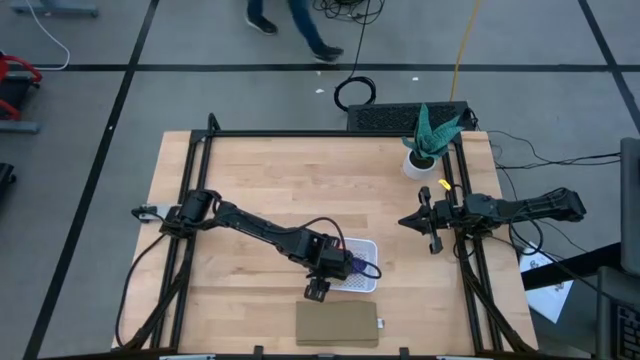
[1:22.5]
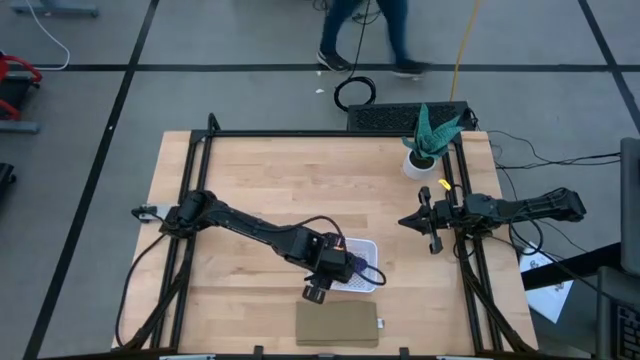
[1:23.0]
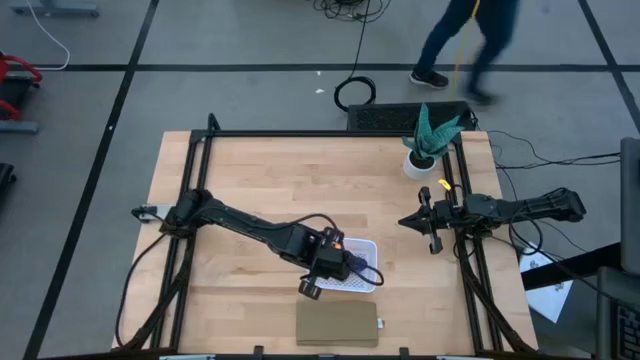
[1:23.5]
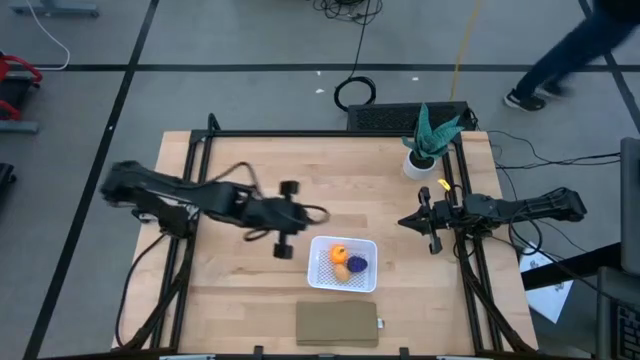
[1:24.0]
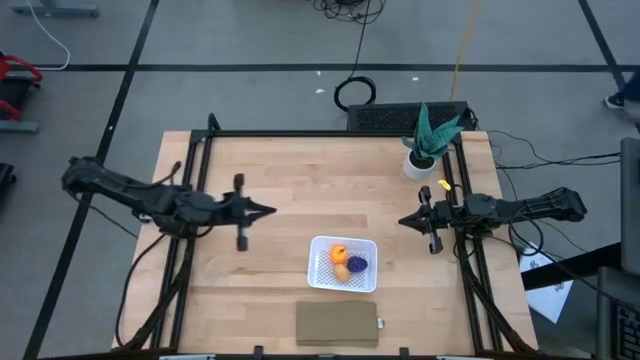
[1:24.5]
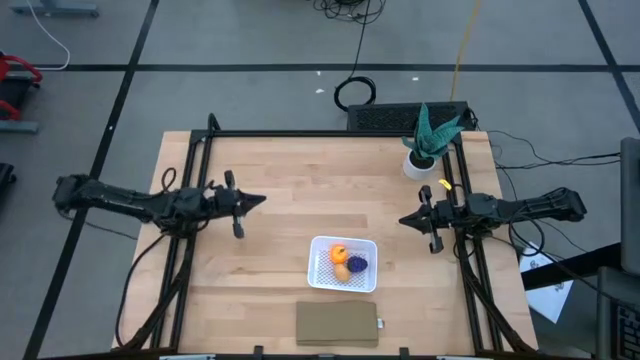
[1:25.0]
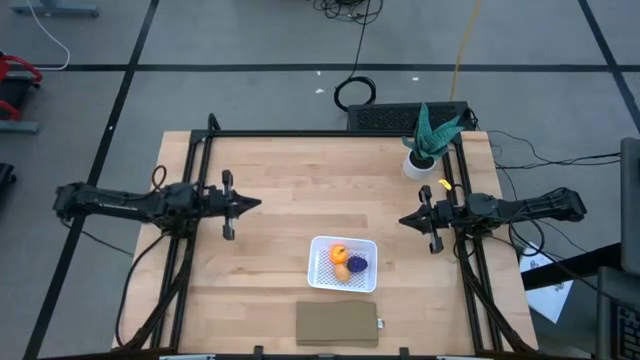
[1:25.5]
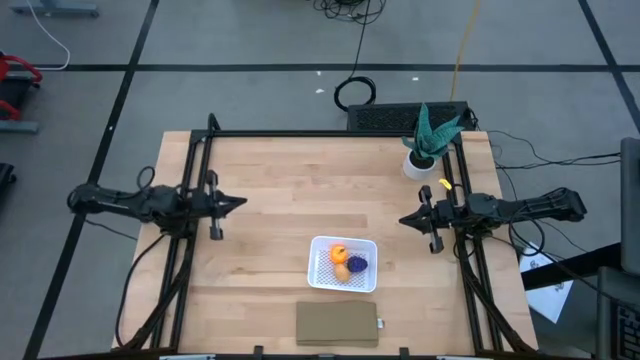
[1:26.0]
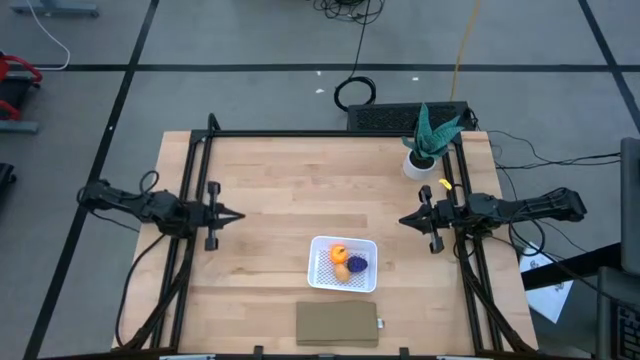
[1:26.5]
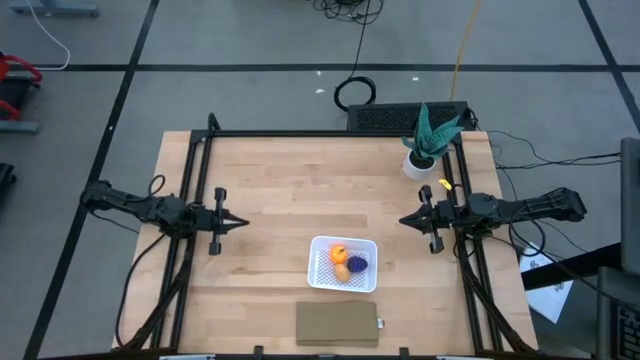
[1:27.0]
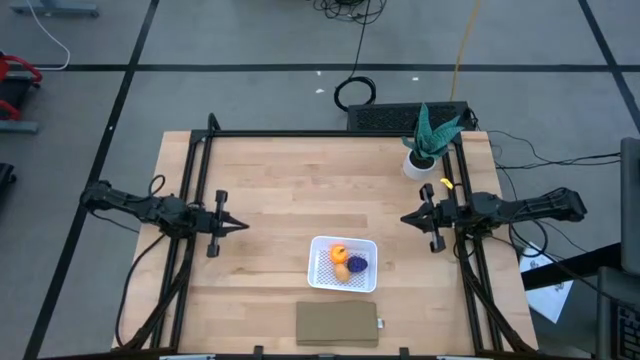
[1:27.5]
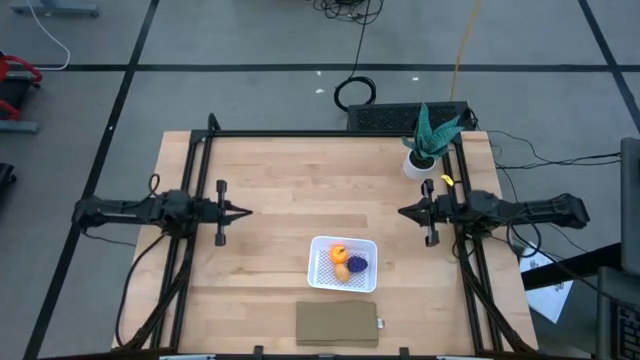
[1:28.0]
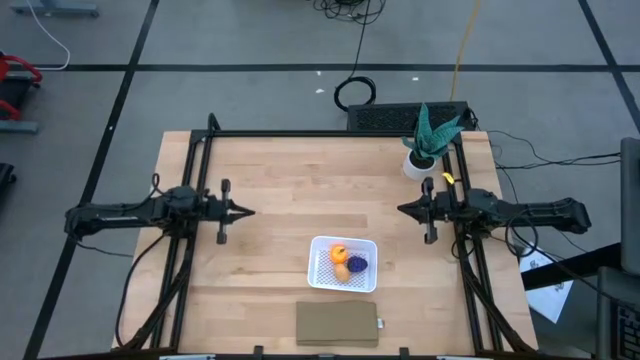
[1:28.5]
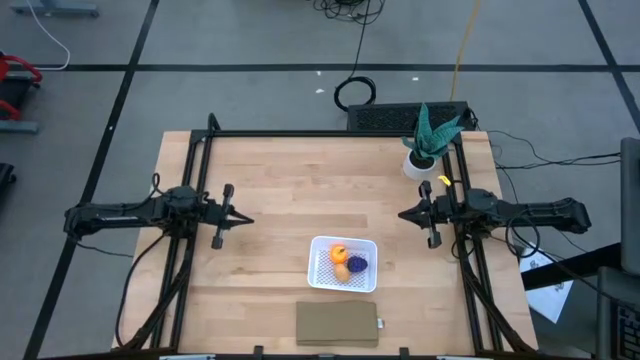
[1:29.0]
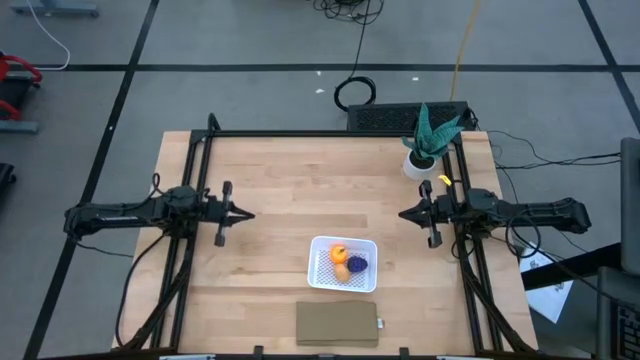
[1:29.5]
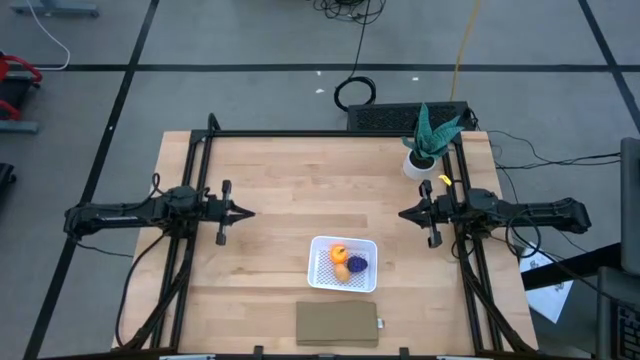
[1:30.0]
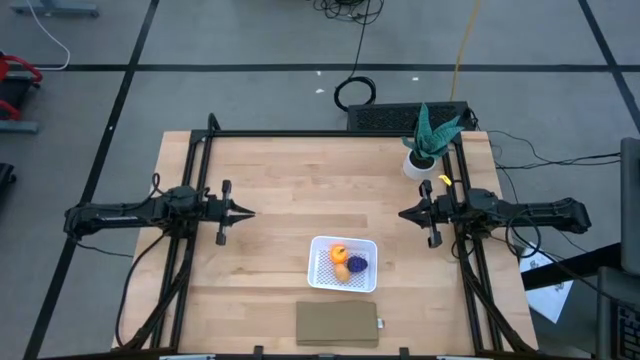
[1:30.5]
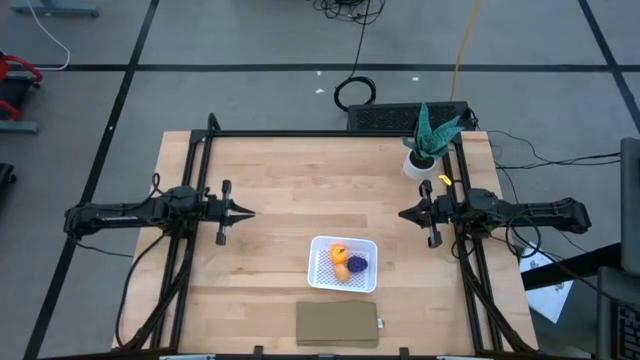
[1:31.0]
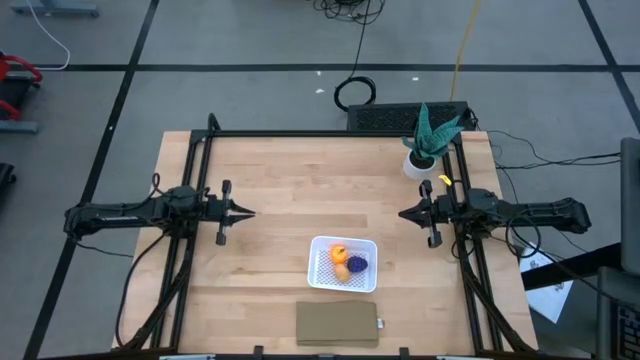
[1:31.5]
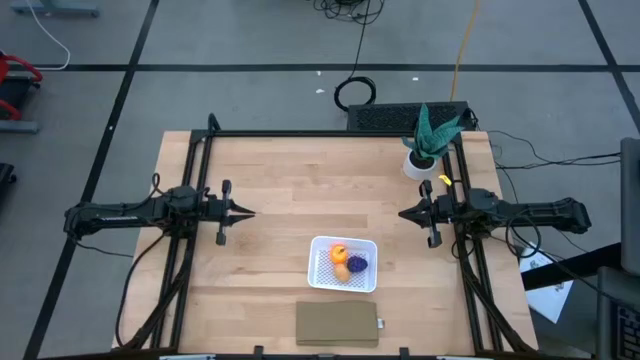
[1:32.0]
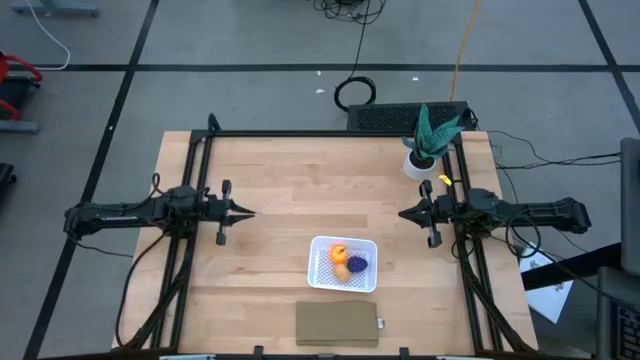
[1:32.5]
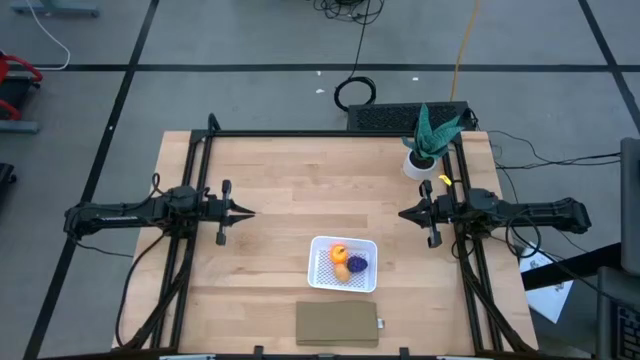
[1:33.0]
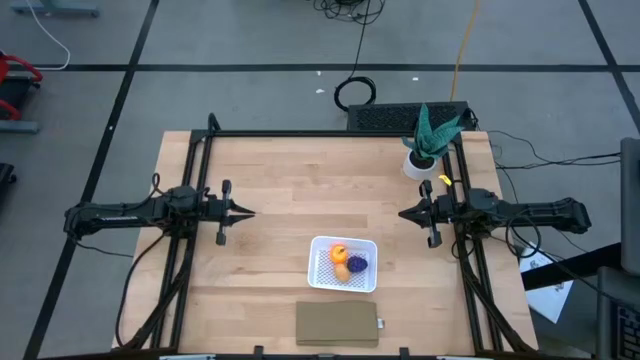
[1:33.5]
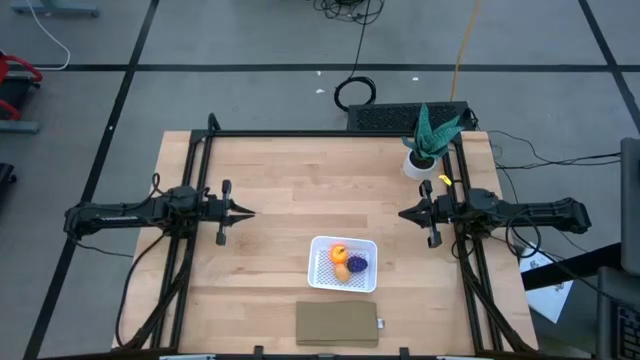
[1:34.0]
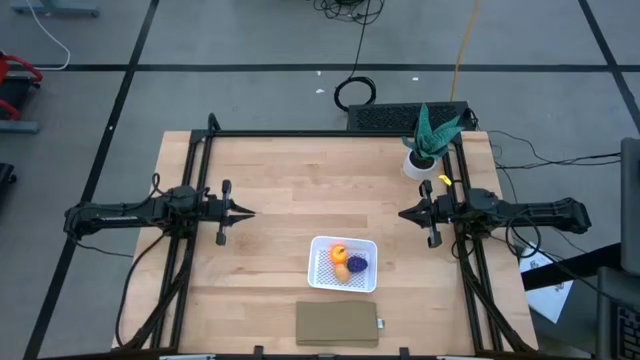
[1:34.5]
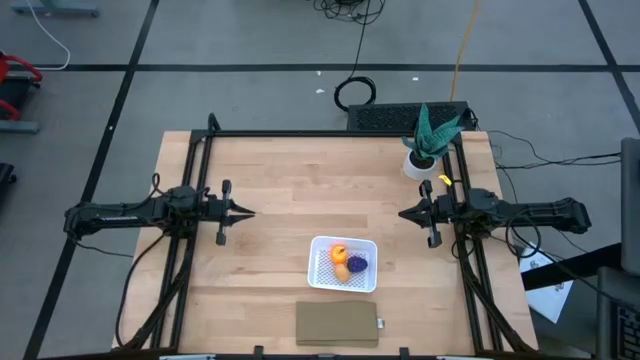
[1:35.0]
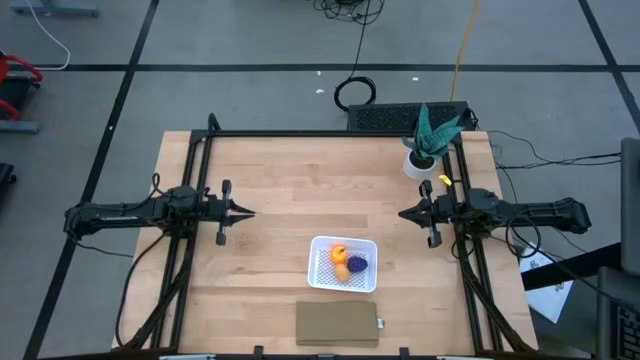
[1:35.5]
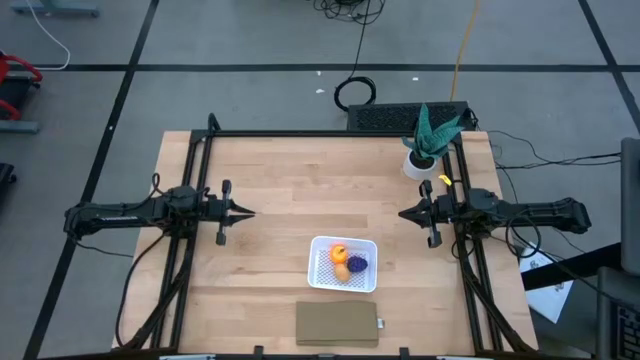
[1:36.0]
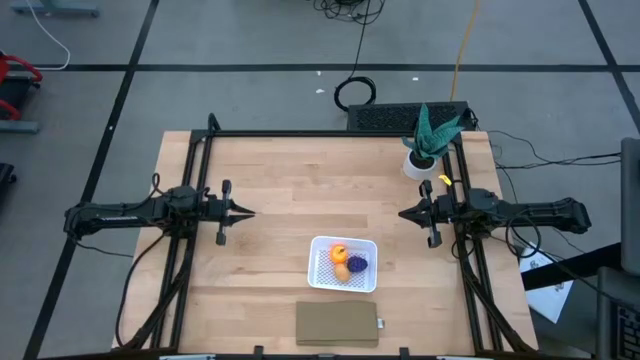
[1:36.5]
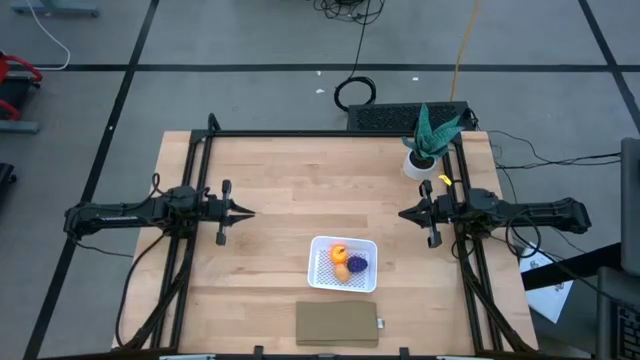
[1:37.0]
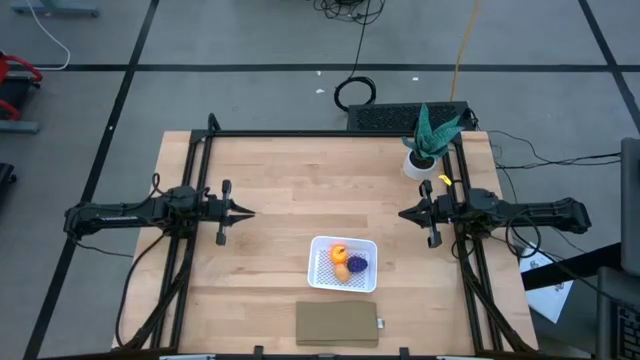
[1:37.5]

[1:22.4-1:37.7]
Task: Pick and placing Produce into tupperware
Return to Home Position

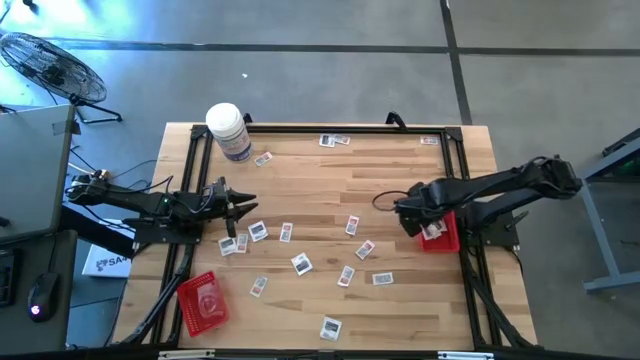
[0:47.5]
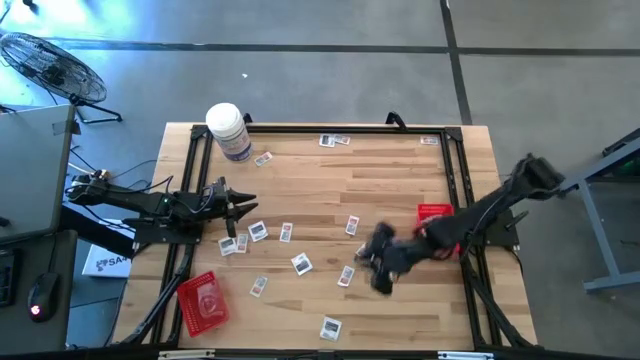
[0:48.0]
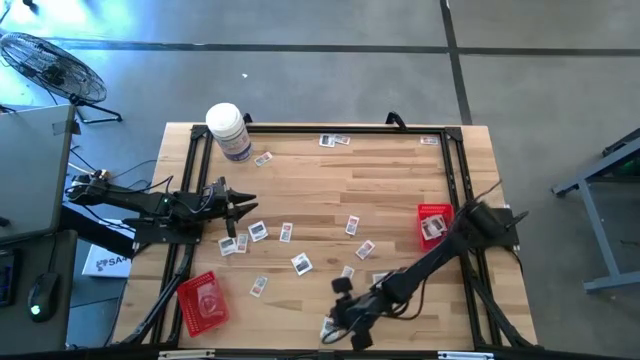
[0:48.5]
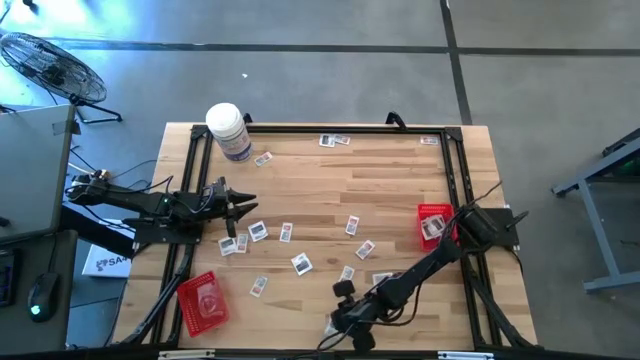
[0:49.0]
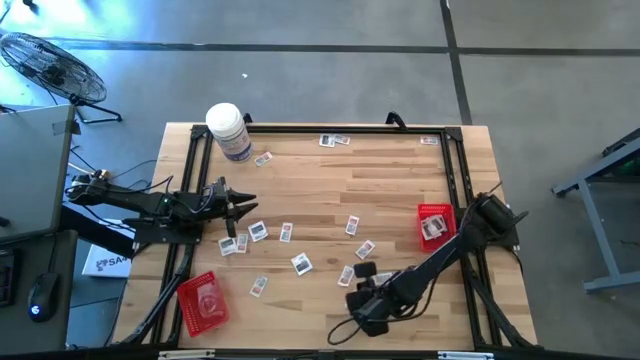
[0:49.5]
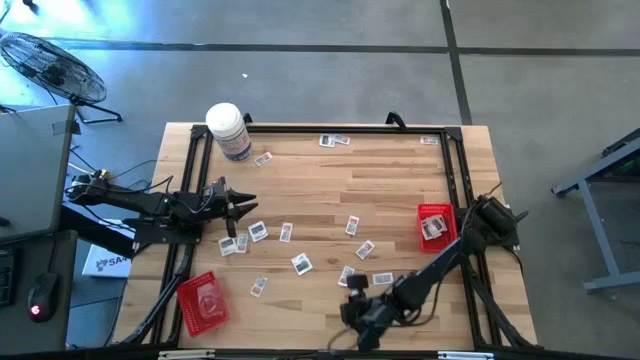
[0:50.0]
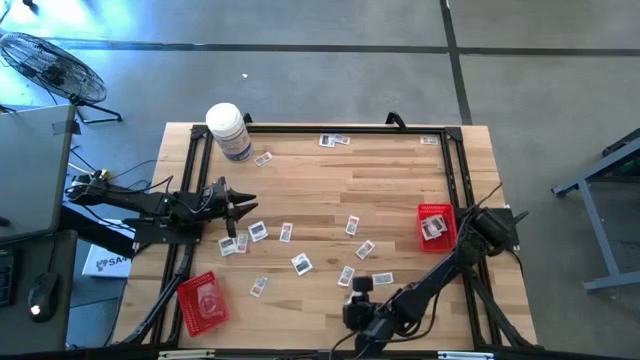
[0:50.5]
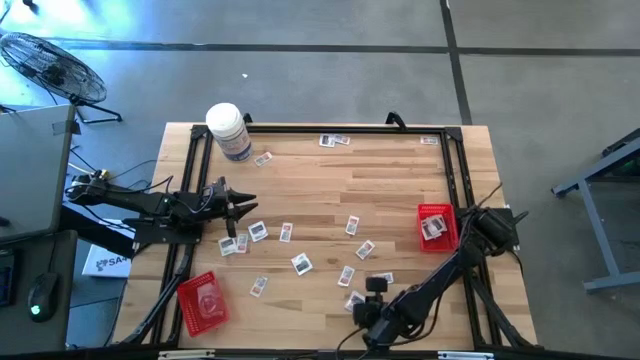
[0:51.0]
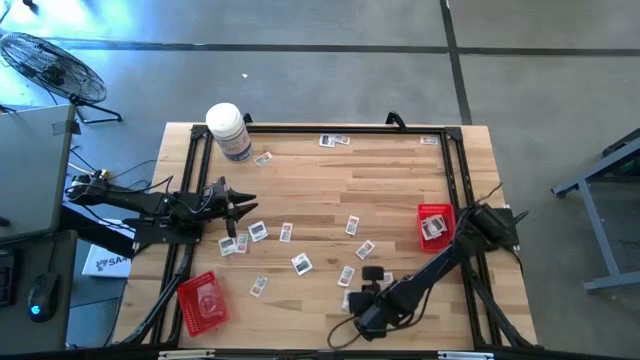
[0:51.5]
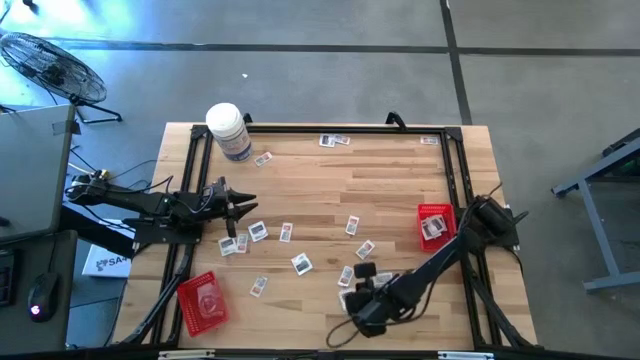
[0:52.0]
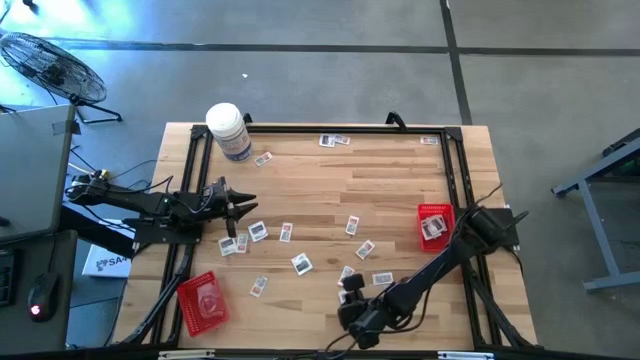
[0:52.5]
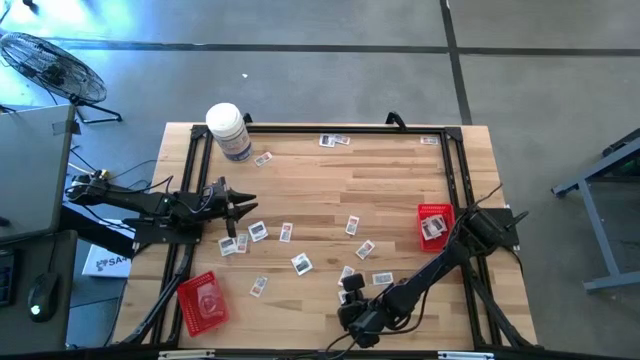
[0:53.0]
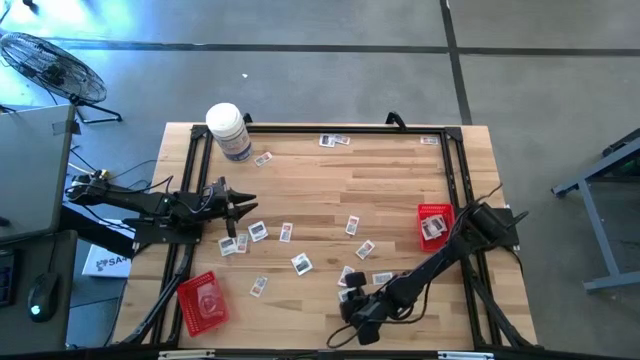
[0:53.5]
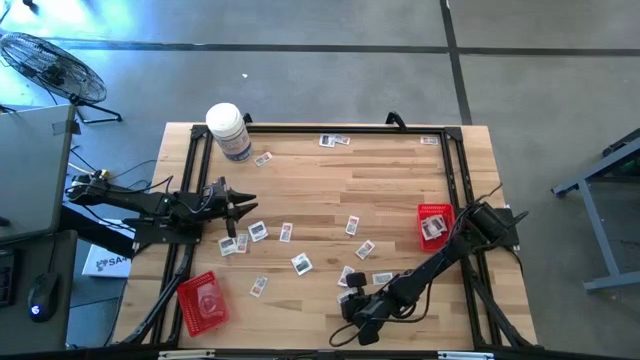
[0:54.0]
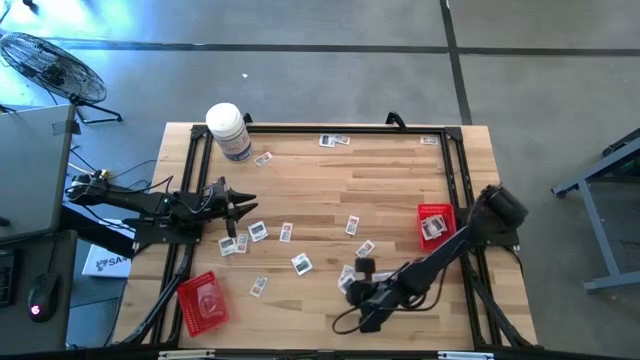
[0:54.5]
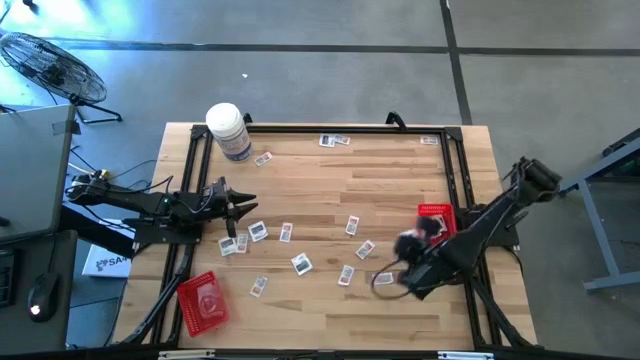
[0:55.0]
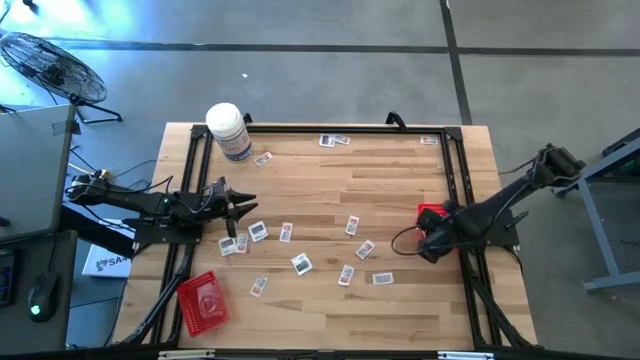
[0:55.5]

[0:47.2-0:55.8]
Task: Pick & Place First Aid Supplies
Put the towelette pack into the right red bin
